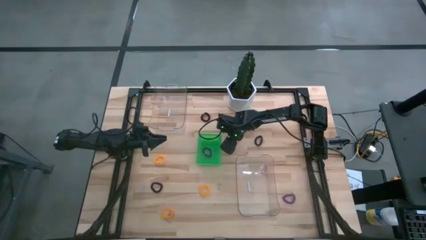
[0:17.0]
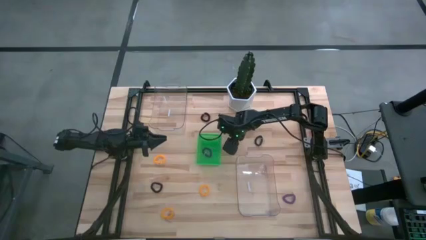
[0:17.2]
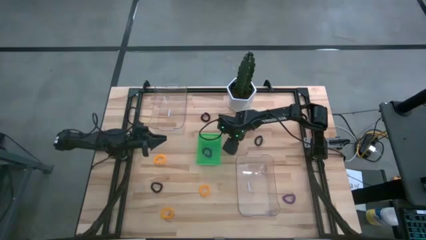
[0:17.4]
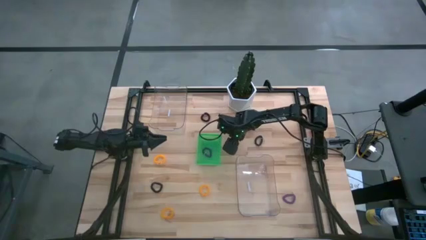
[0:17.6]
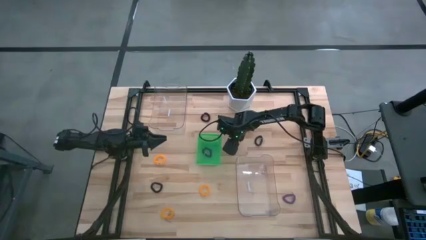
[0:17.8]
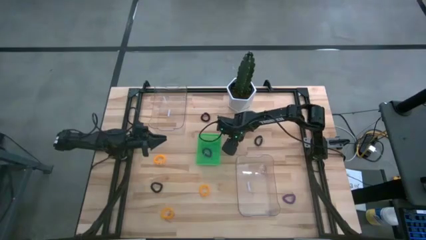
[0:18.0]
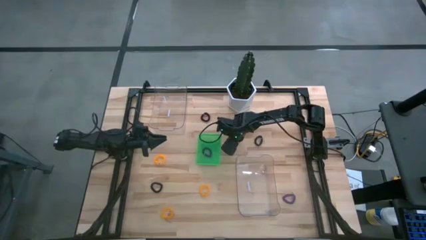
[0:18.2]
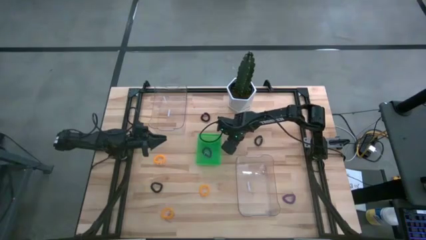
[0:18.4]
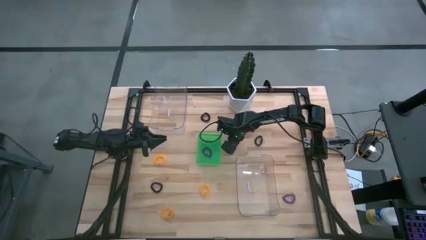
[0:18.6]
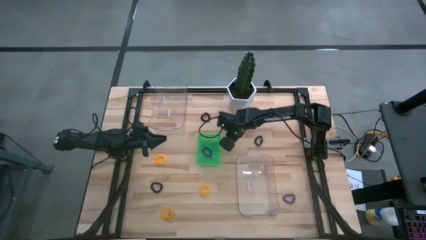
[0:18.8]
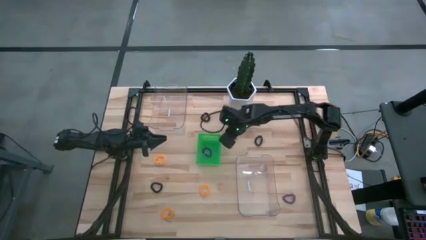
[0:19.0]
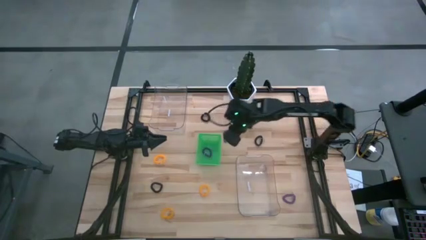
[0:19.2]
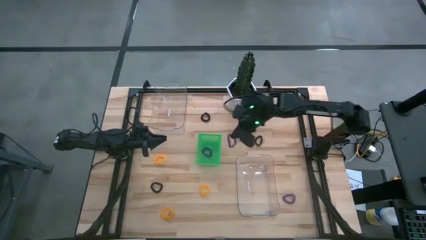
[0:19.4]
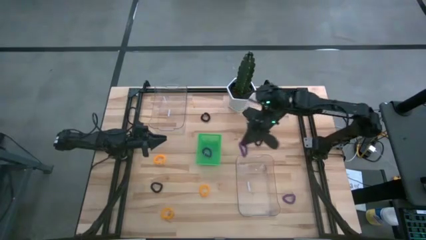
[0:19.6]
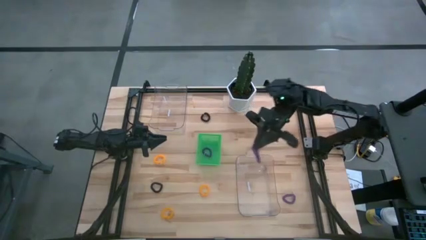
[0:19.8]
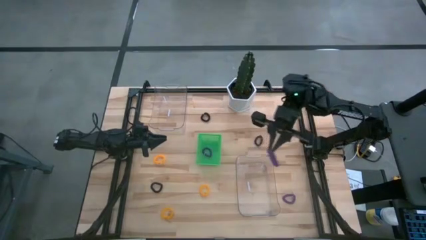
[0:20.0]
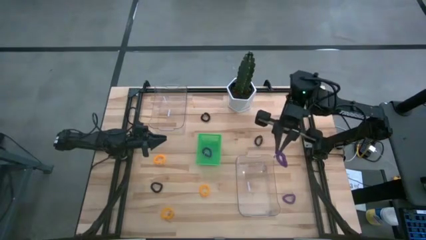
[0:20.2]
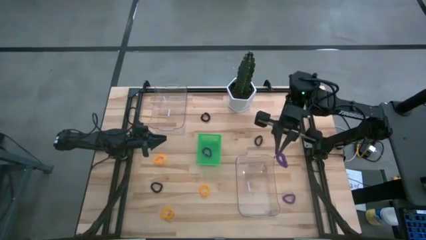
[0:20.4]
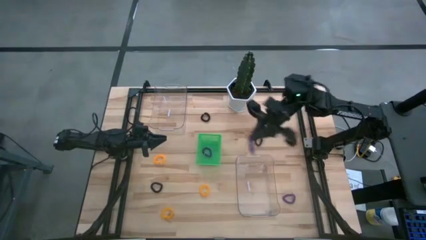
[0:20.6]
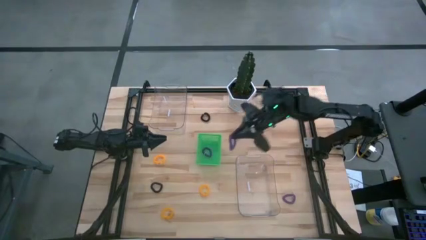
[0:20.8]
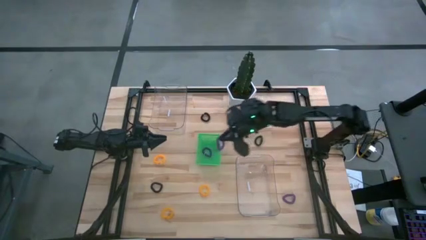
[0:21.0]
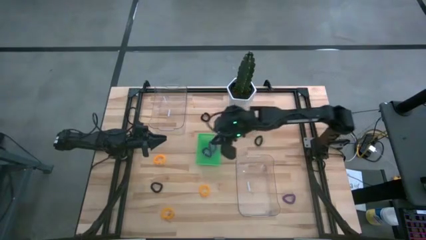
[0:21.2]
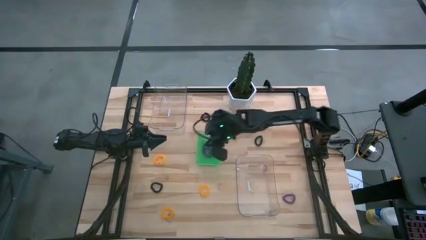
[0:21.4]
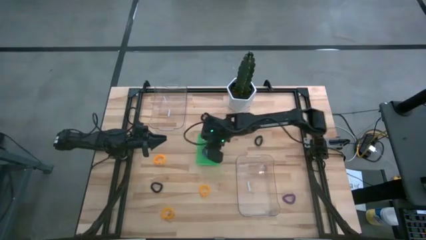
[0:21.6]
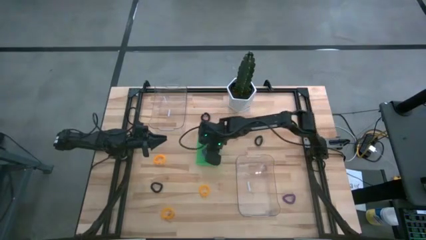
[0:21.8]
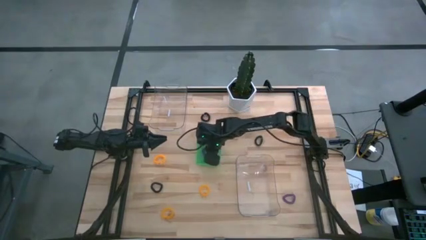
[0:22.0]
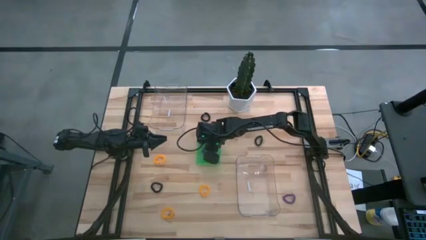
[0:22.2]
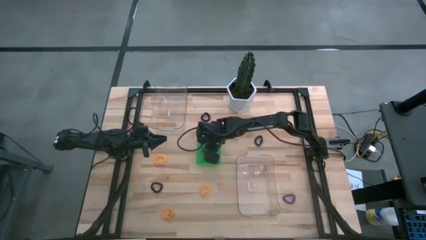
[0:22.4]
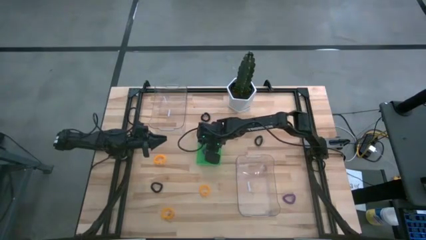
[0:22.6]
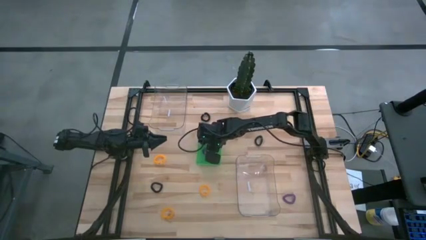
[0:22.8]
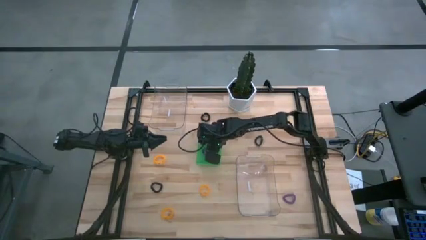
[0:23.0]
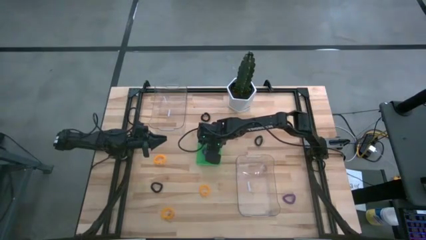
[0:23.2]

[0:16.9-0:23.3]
Task: Sort spring keychains
Put the top purple spring keychain into the green bin

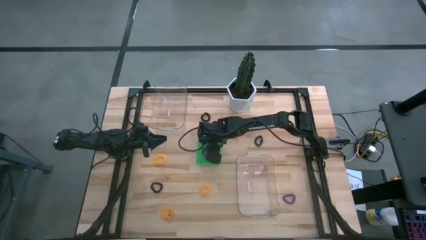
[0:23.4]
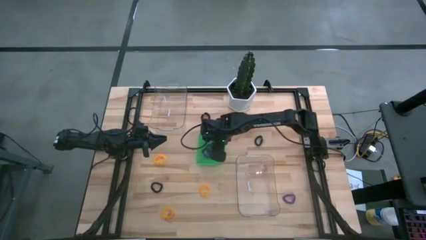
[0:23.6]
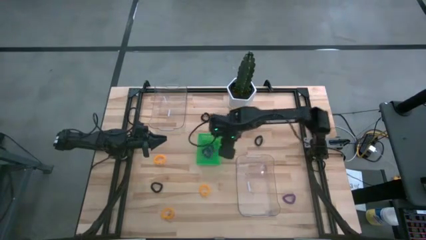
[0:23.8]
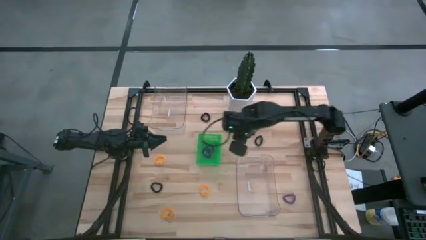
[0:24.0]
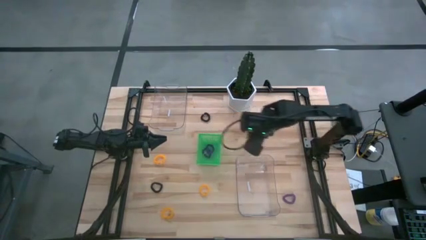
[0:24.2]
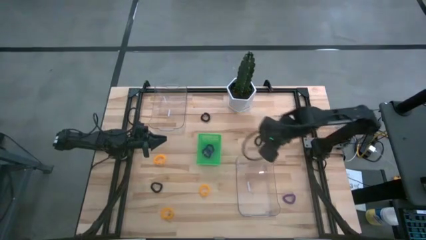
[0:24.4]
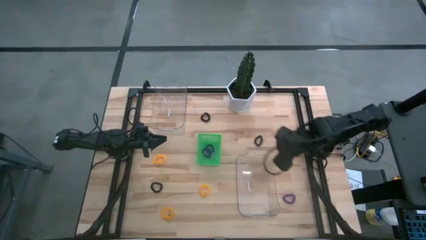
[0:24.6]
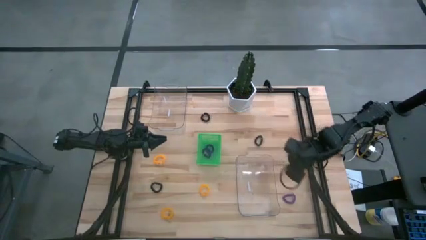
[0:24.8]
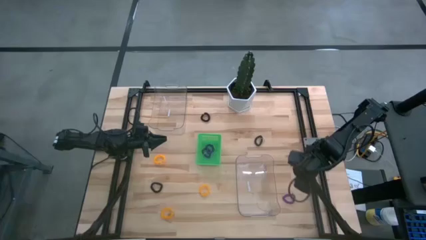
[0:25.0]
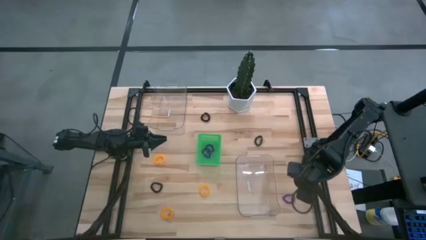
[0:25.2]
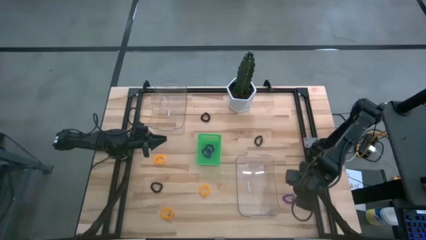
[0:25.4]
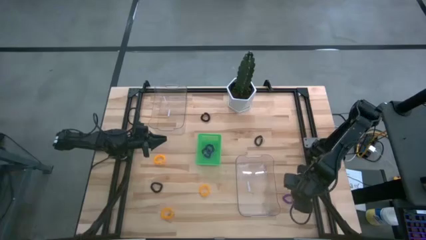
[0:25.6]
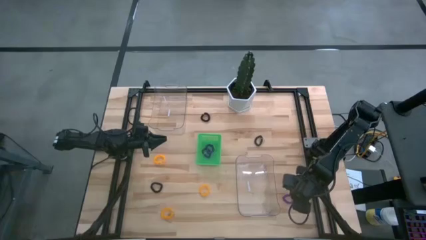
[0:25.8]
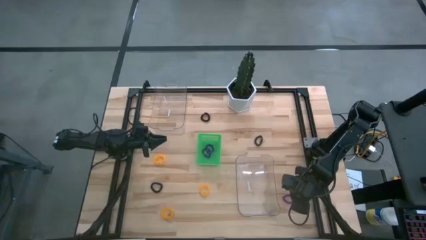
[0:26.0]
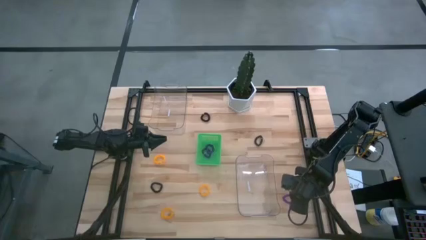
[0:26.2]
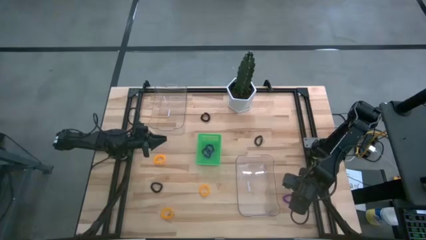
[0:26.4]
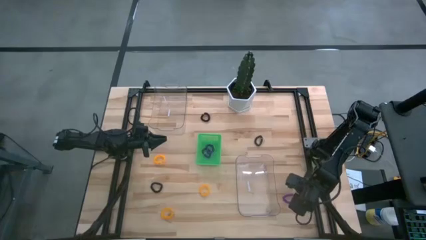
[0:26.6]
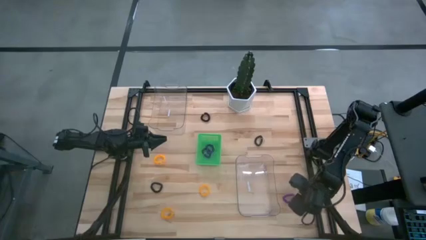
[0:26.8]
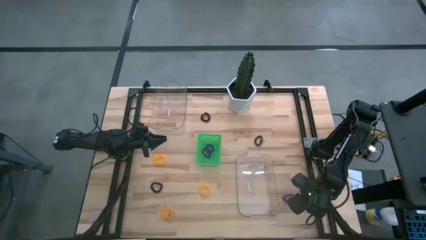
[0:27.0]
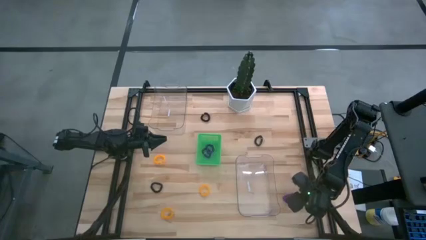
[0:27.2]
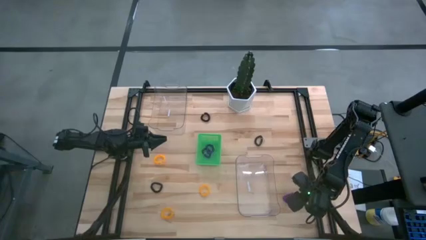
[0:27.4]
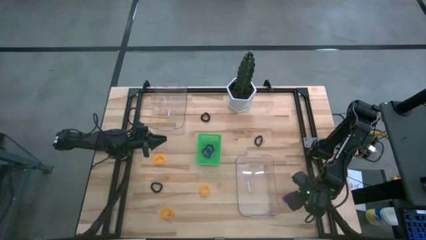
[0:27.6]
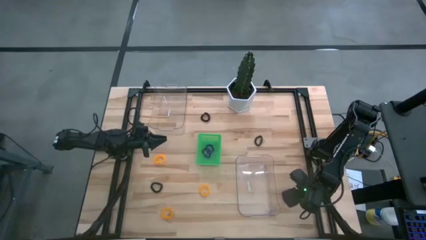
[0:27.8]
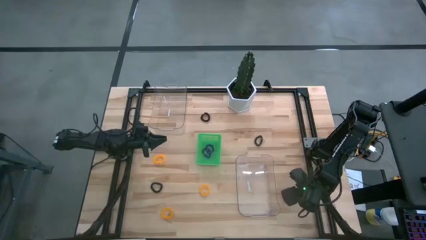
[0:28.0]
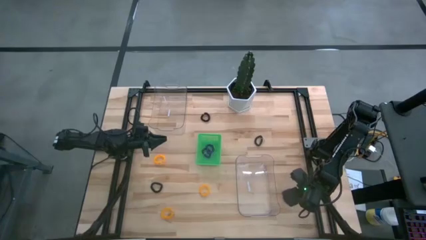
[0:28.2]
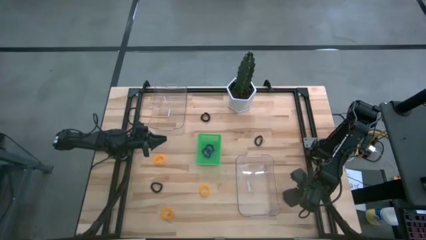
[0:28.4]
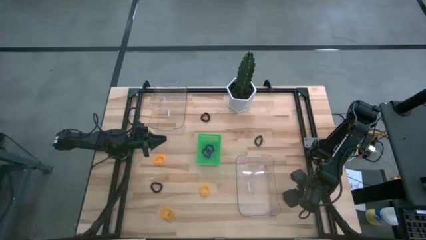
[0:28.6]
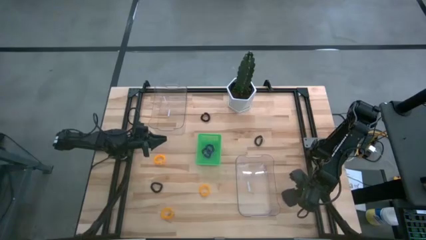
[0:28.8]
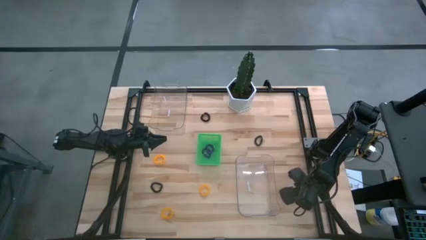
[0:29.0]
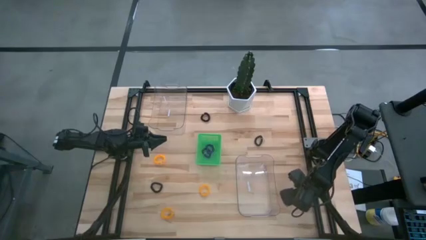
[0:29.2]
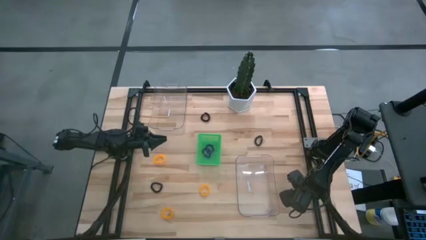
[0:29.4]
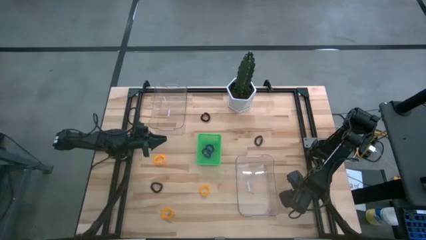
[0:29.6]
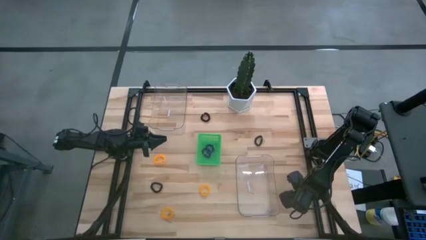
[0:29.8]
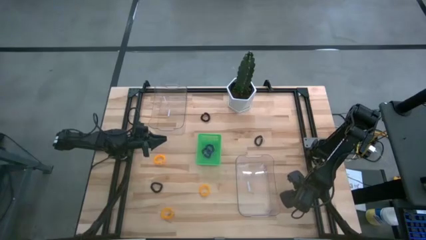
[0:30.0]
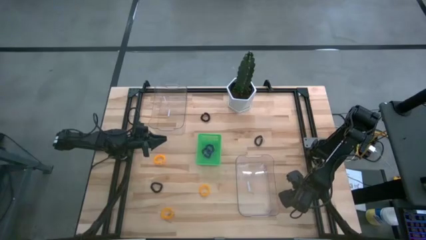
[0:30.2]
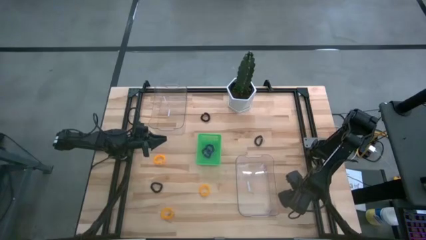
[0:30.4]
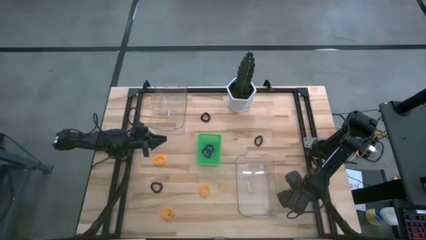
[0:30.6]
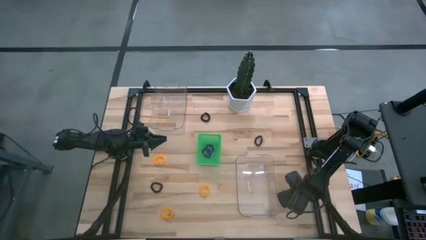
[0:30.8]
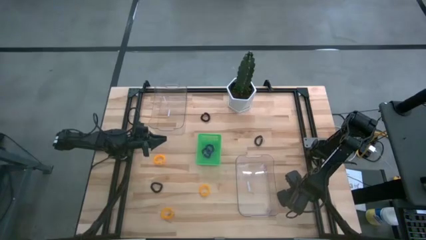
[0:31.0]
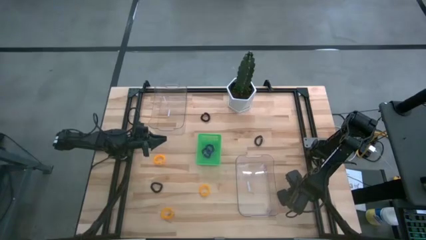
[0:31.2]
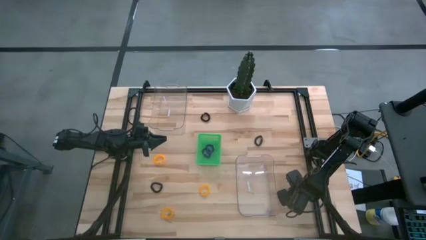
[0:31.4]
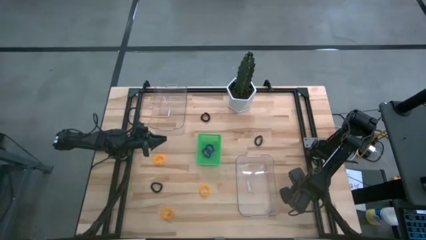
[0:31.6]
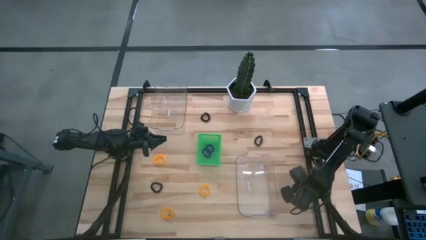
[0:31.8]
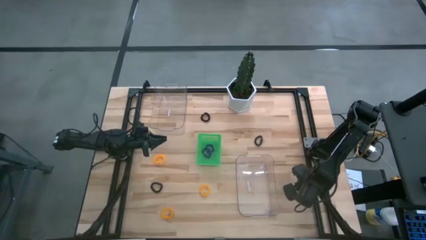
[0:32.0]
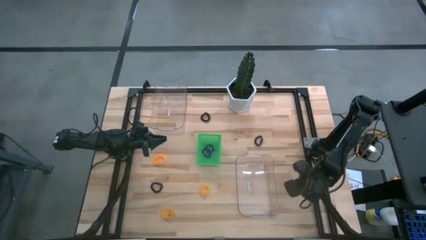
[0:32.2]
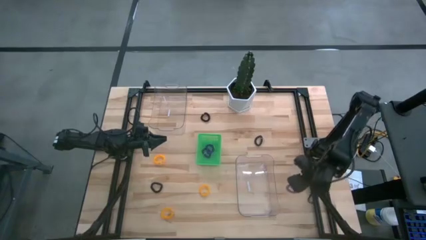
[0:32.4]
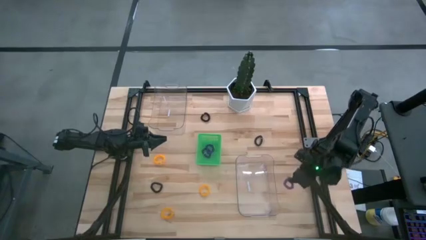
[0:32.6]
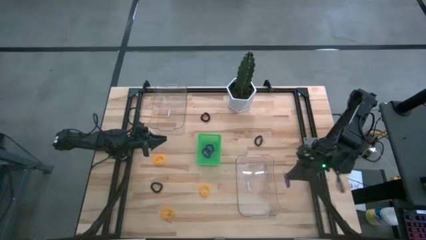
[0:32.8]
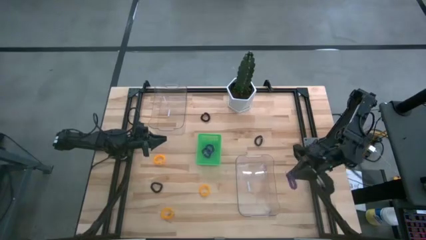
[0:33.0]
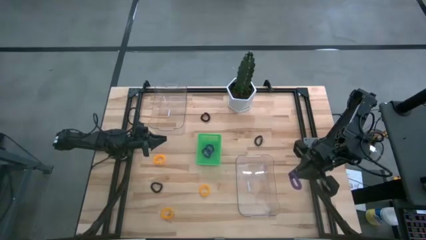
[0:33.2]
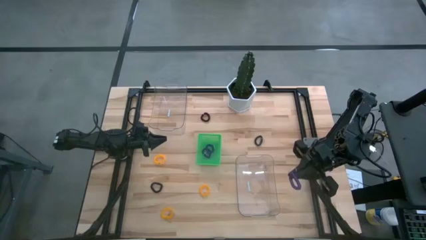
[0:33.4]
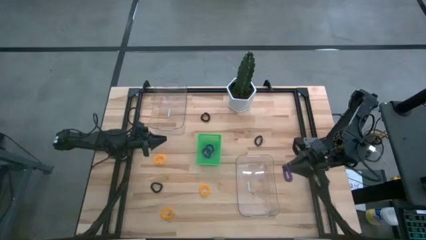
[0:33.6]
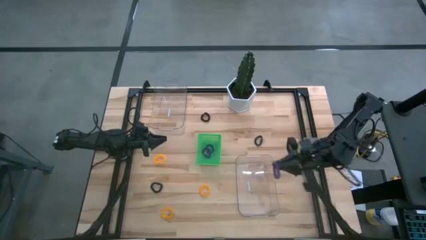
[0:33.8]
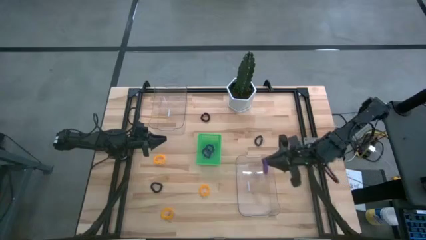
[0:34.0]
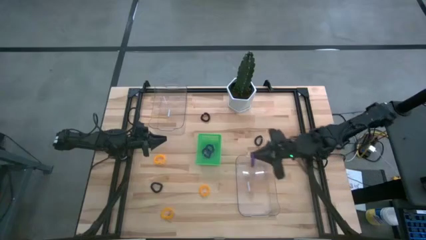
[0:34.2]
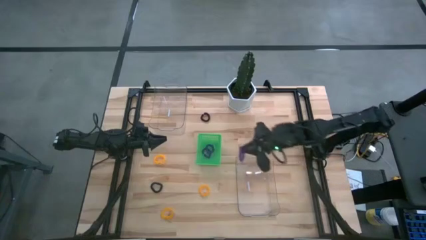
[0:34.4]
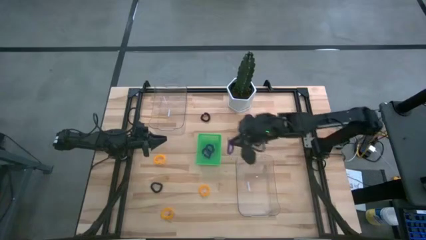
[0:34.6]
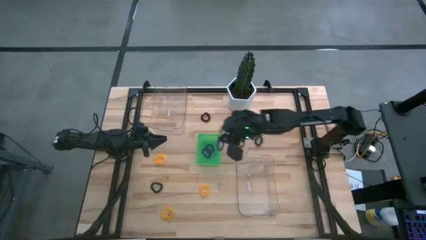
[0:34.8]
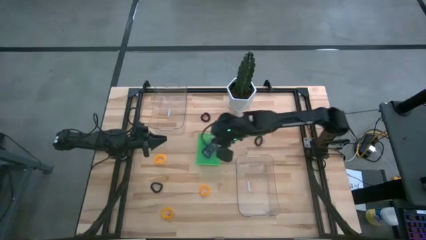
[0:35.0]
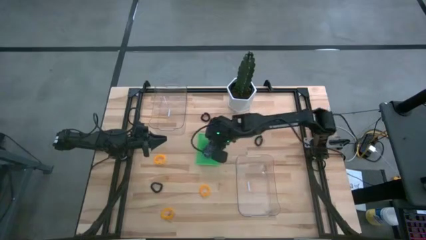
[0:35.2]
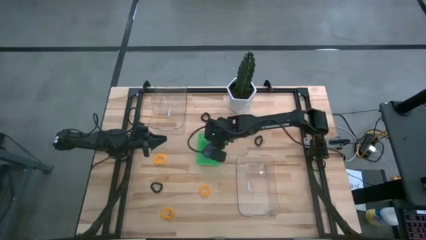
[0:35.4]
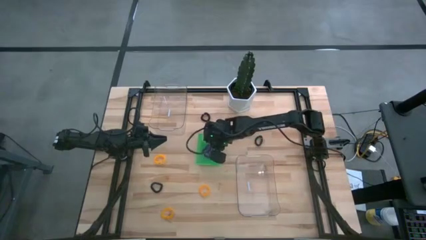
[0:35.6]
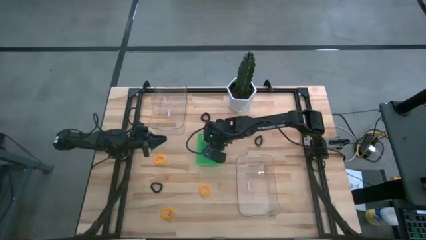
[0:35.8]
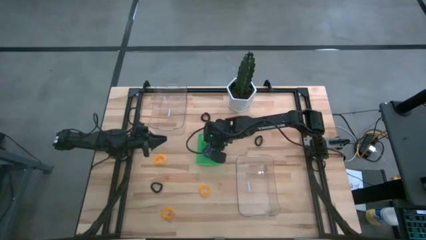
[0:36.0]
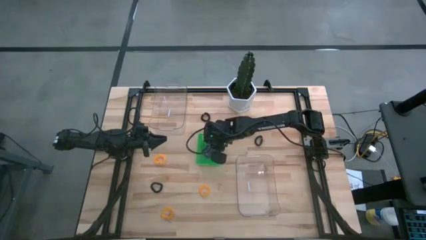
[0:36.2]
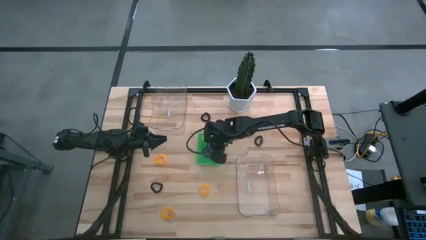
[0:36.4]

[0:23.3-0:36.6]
Put the purple spring keychain into the green bin
